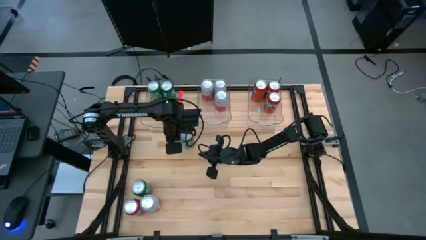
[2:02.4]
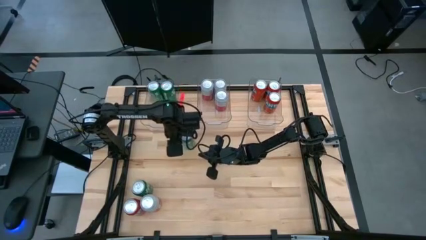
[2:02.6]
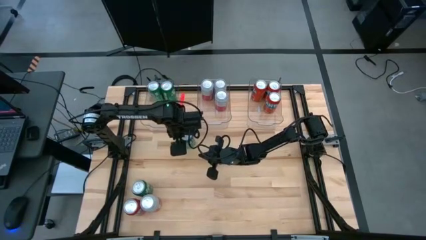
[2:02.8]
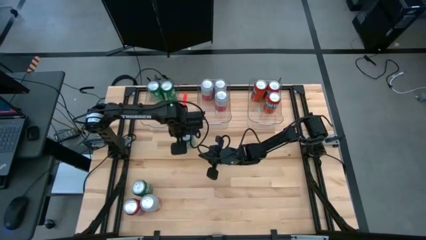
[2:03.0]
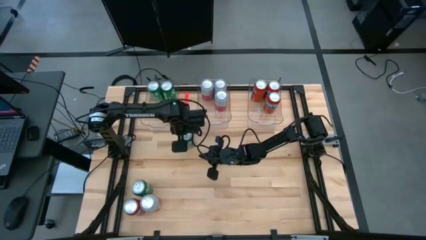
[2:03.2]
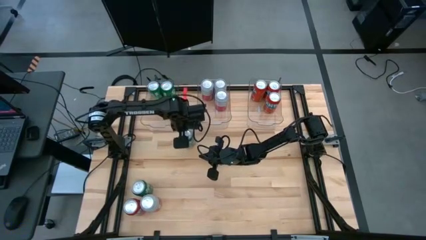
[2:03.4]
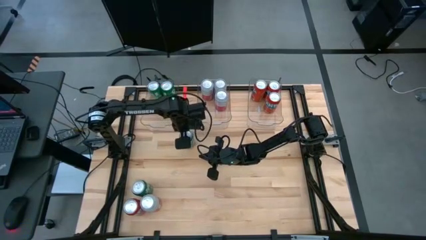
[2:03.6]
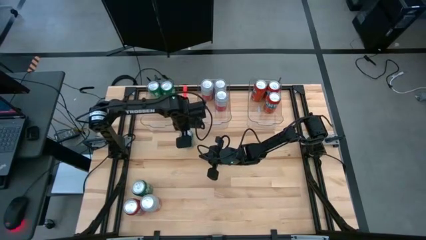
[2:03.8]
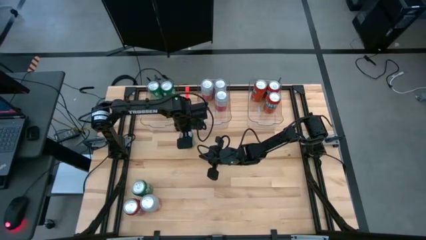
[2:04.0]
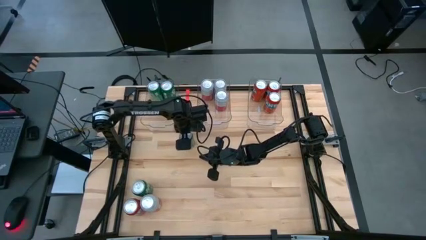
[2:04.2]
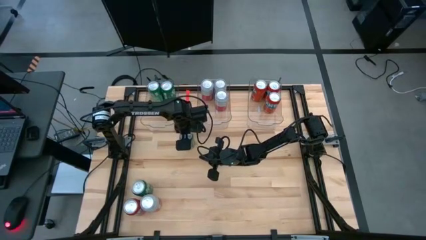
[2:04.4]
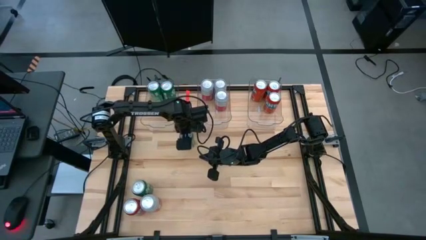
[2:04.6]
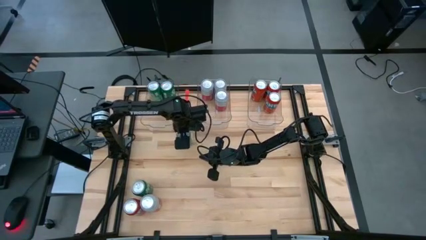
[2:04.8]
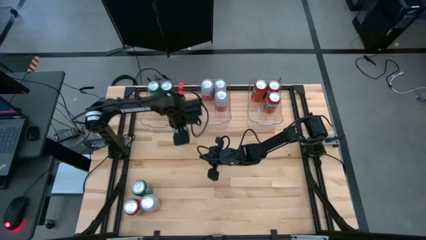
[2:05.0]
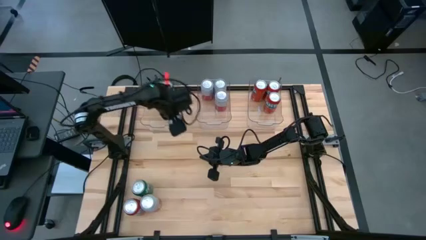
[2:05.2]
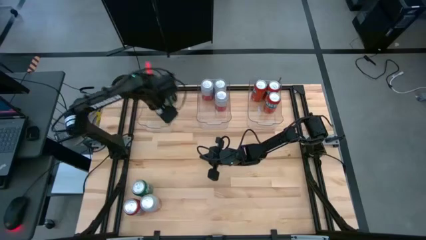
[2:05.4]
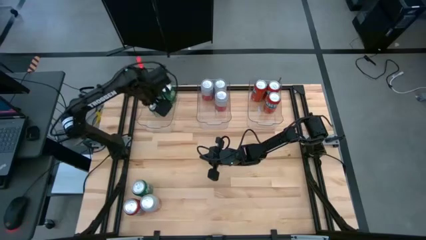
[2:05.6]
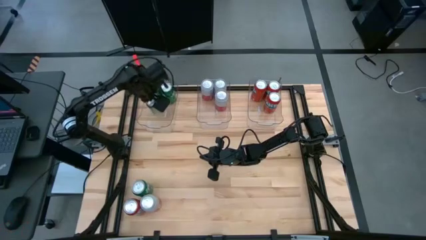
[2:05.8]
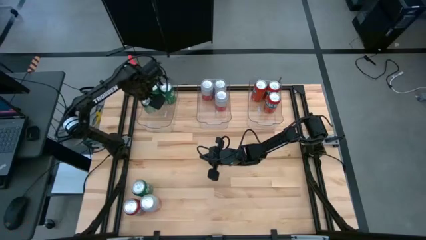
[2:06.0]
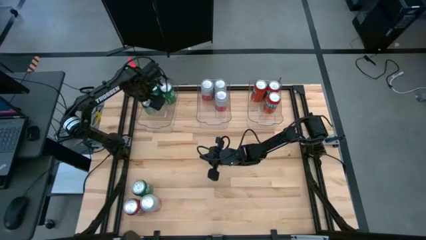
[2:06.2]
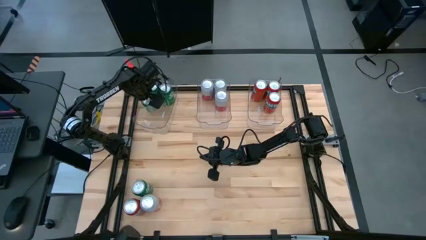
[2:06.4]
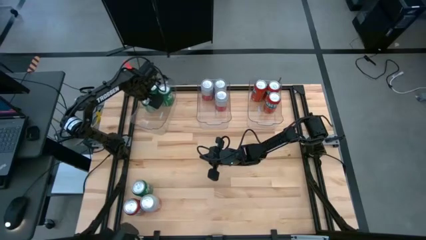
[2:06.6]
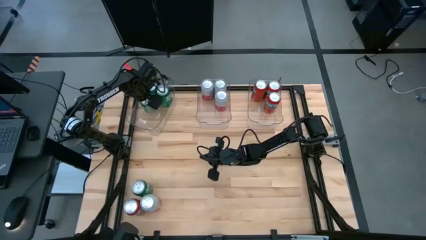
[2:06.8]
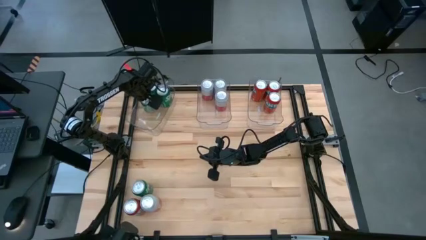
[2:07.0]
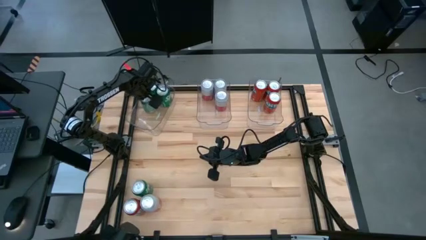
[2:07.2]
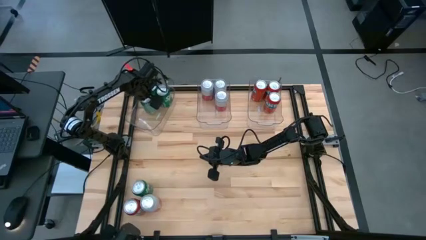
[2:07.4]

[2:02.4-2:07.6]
Task: Sort soda cans
Put the green soda can into the left transparent bin

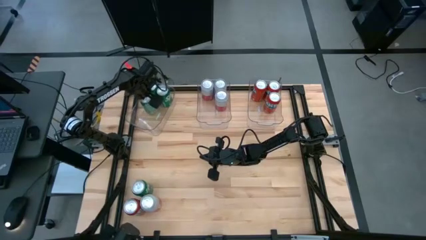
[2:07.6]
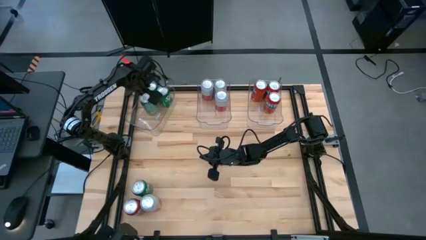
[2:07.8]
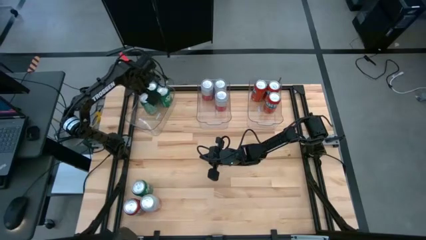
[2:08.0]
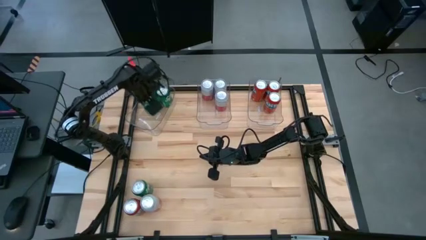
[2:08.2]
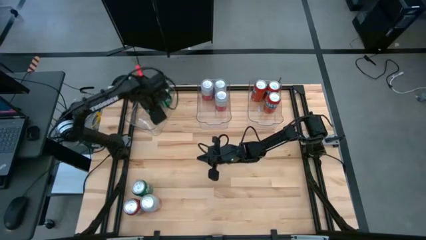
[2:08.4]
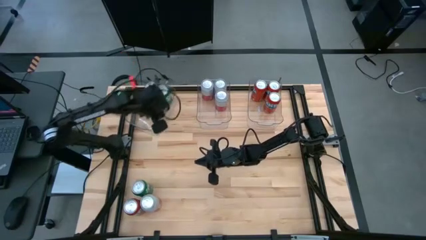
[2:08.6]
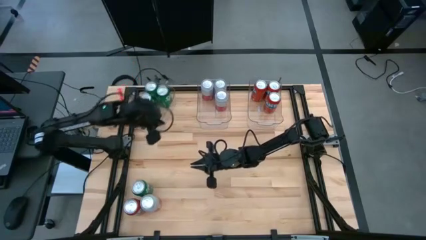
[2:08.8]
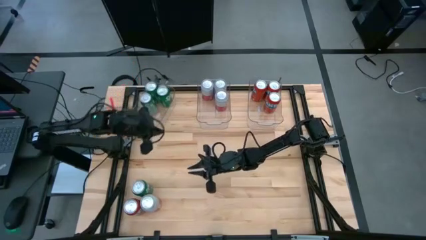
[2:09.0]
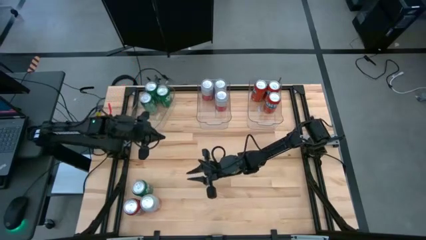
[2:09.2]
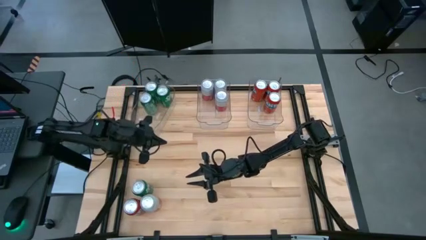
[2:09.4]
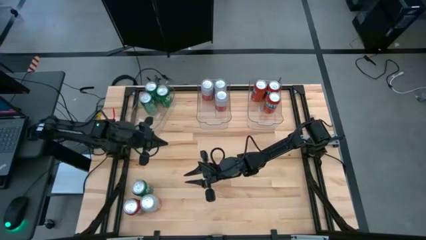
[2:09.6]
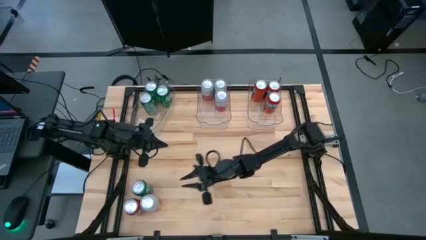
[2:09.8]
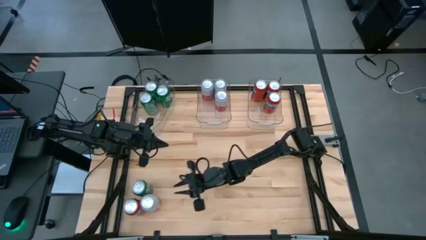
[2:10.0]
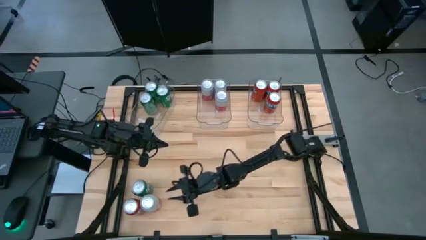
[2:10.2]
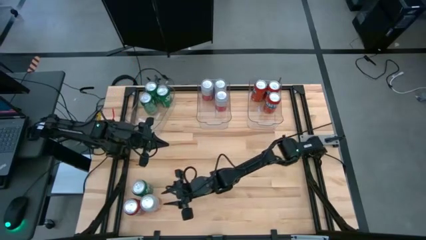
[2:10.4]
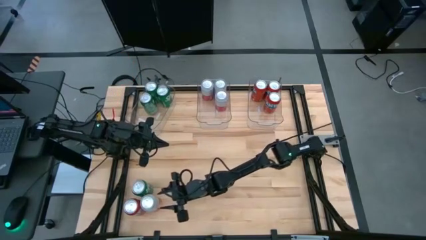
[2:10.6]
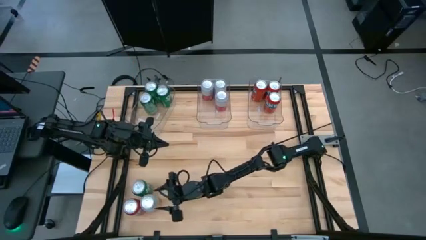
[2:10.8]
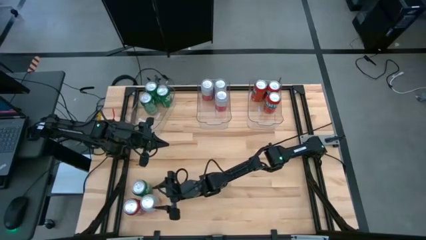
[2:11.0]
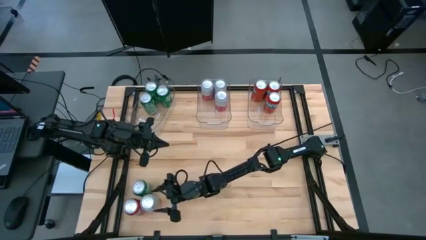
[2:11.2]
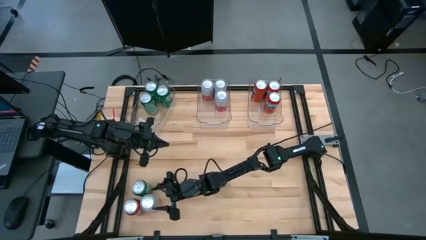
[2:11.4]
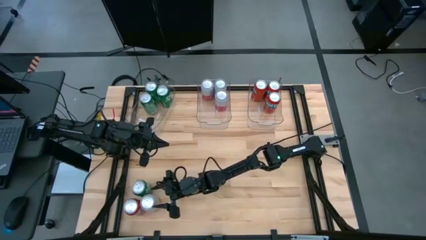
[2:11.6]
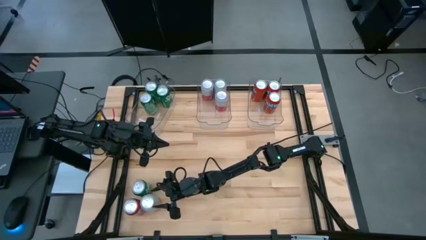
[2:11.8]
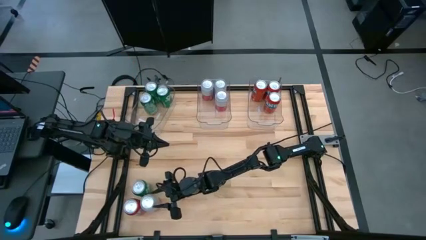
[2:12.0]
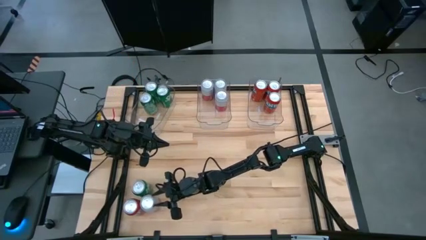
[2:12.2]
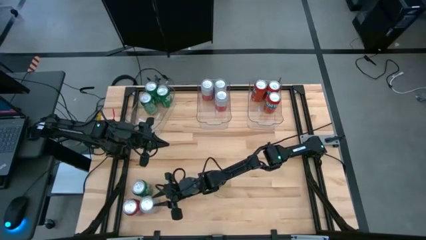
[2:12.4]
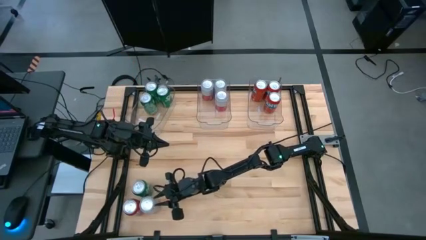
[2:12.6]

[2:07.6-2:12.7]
Put the pink-white soda can into the middle transparent bin

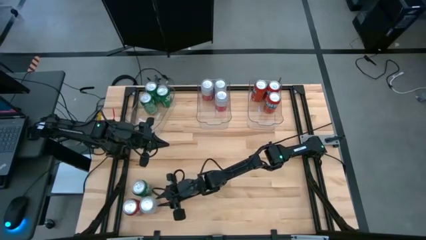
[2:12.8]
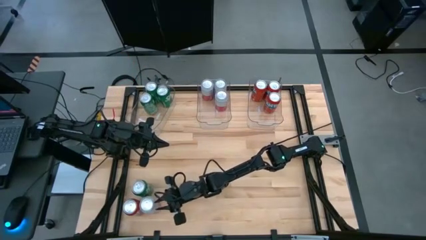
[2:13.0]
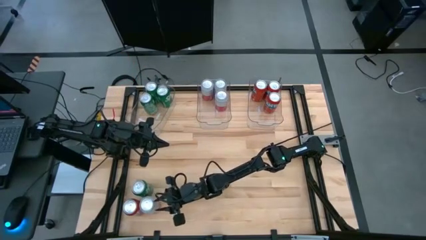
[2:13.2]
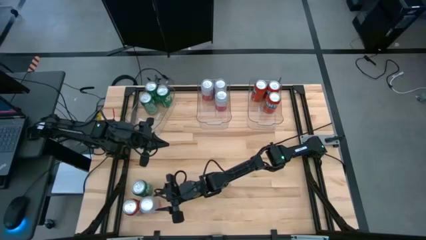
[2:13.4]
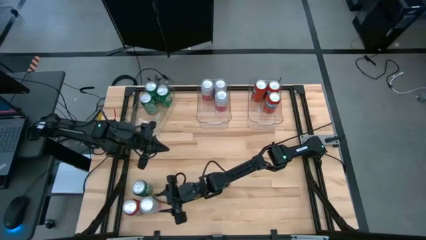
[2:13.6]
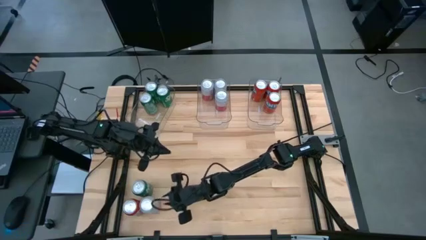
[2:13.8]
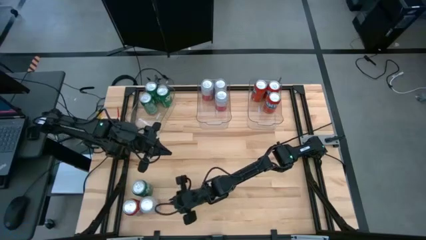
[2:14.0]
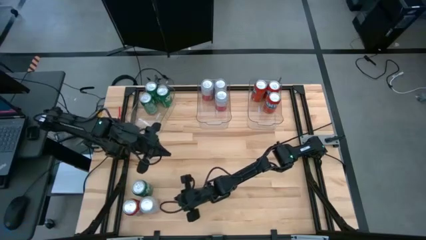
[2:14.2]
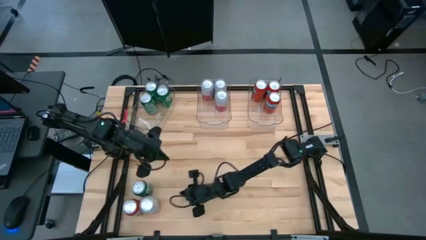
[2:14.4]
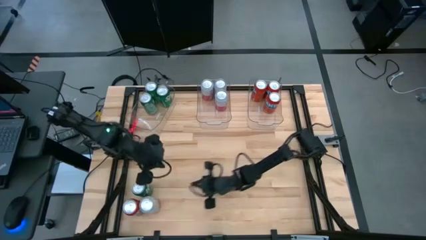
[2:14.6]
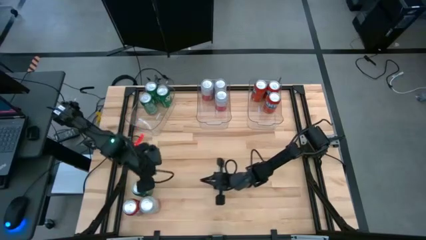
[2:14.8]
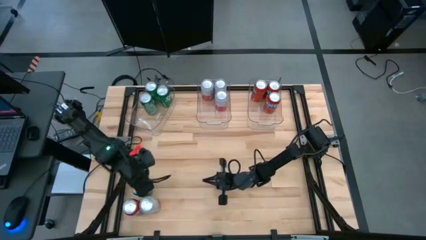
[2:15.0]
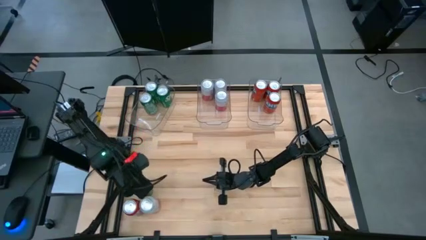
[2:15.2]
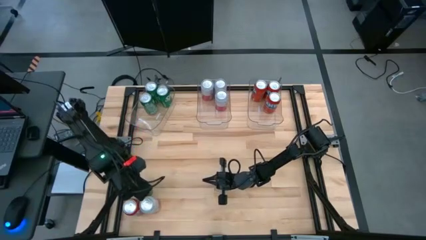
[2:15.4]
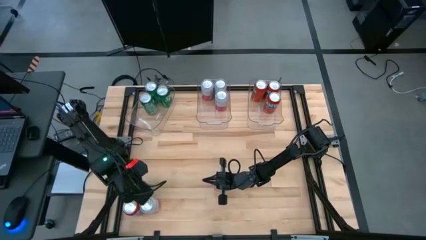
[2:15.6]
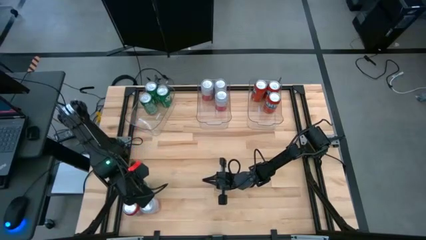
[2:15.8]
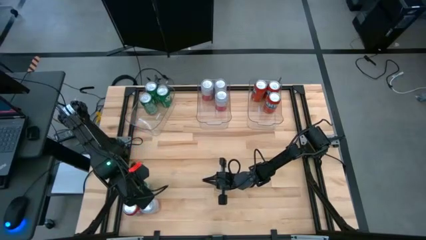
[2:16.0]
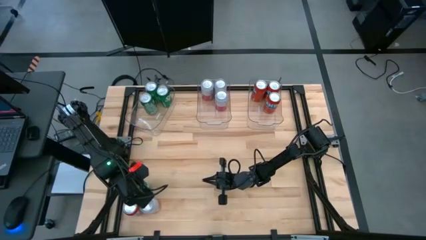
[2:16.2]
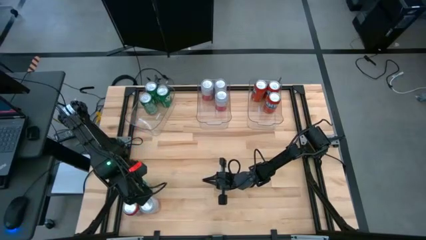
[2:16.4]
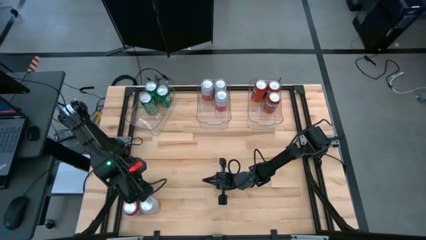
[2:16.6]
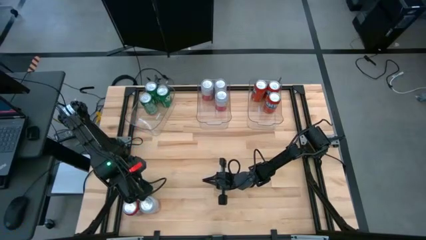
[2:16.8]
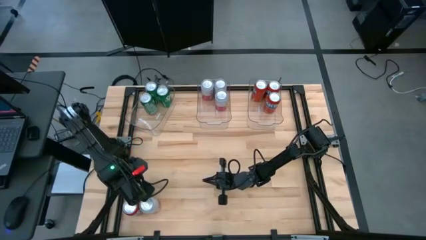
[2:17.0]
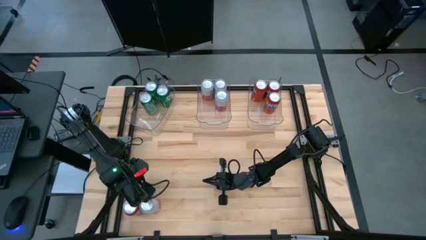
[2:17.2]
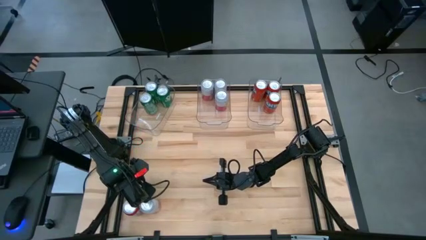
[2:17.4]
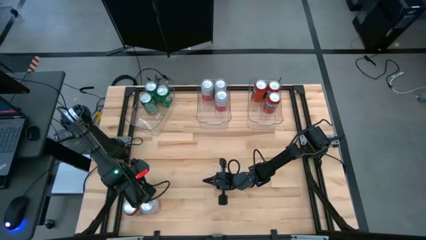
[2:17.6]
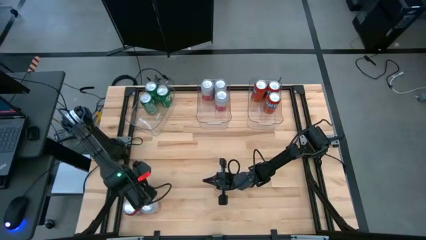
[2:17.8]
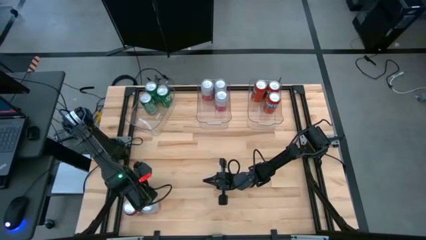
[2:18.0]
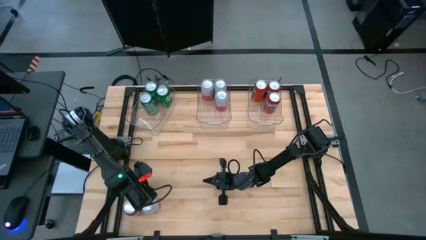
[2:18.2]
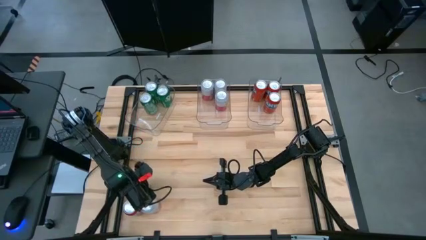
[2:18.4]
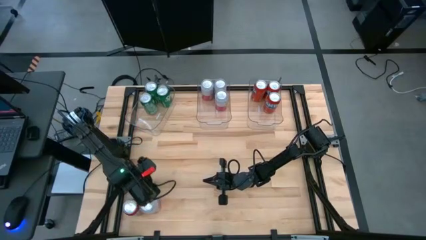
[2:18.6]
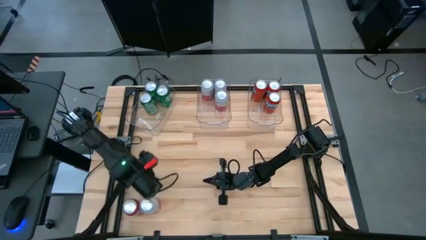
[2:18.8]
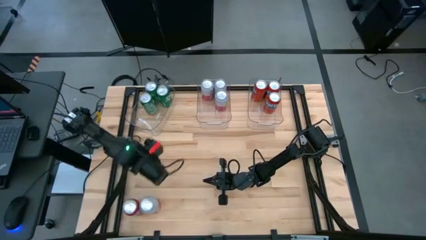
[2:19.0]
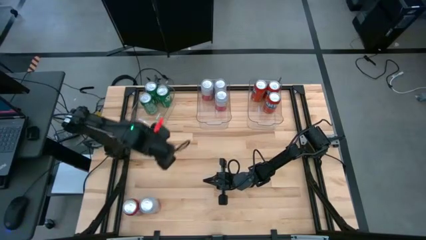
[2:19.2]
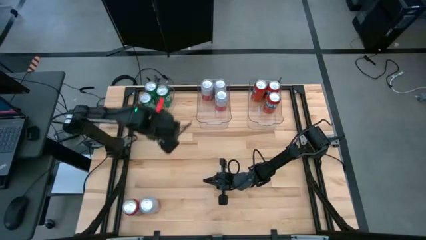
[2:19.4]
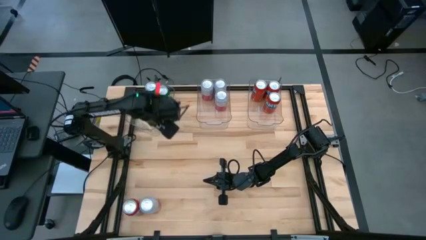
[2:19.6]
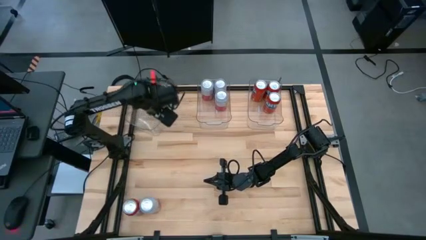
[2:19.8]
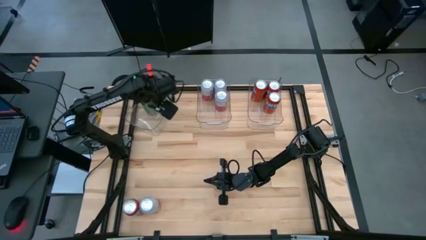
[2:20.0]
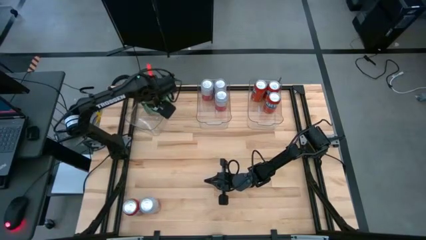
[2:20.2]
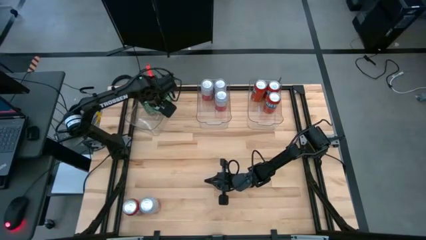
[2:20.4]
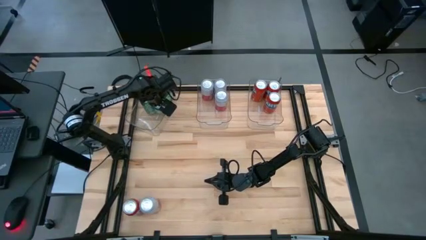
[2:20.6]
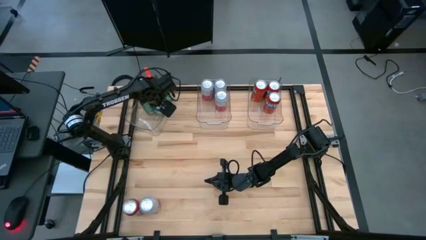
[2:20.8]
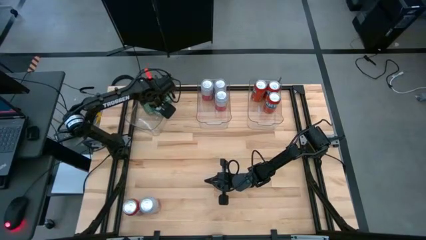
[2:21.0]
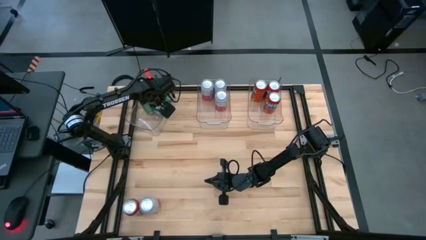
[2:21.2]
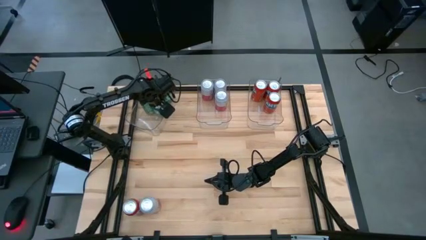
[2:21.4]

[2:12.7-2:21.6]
Put the green soda can into the left transparent bin
